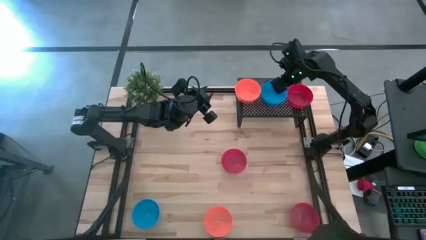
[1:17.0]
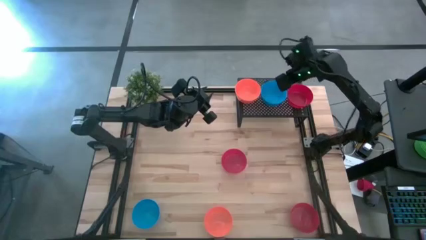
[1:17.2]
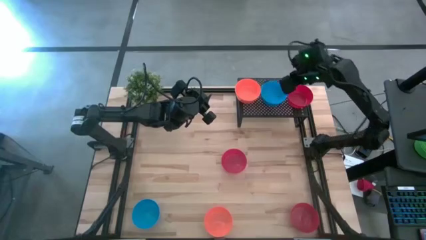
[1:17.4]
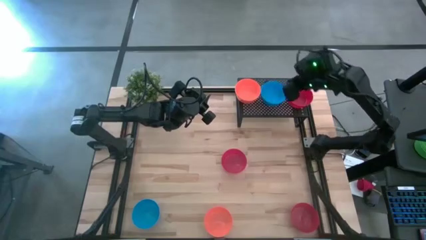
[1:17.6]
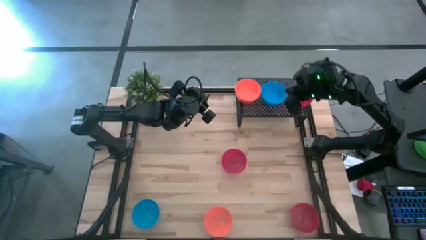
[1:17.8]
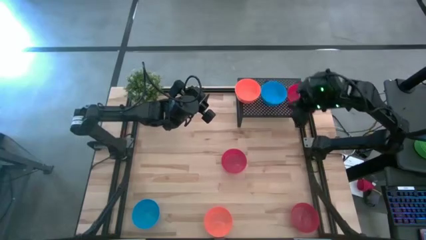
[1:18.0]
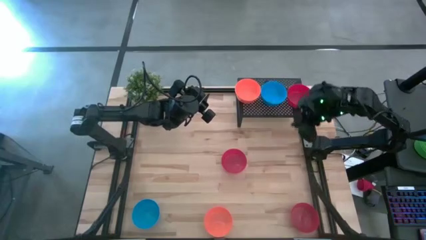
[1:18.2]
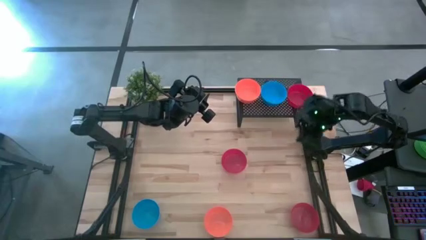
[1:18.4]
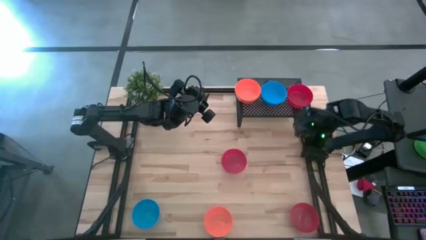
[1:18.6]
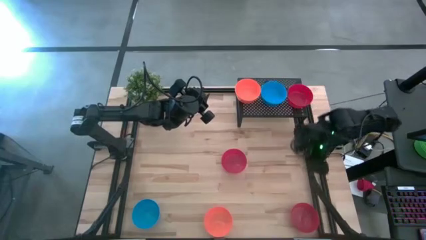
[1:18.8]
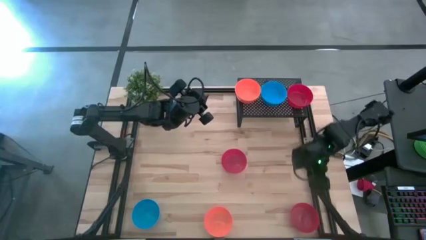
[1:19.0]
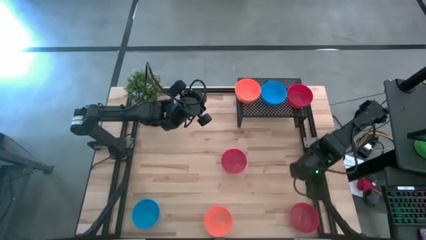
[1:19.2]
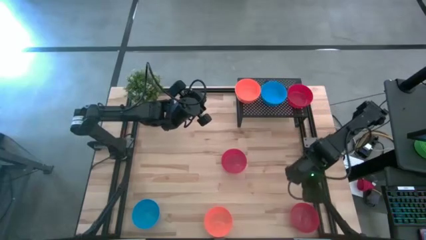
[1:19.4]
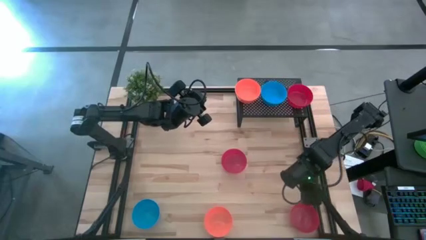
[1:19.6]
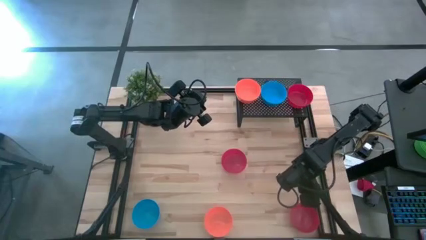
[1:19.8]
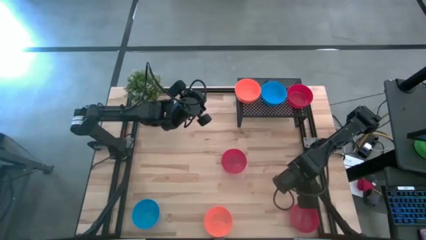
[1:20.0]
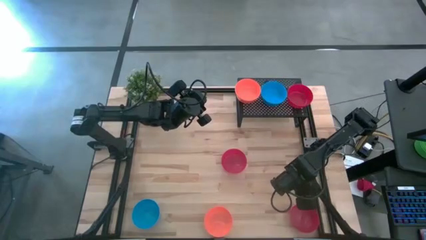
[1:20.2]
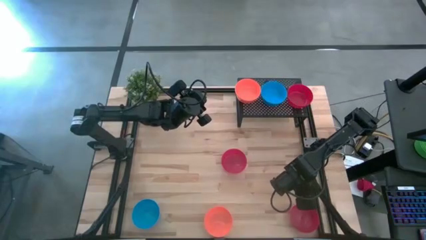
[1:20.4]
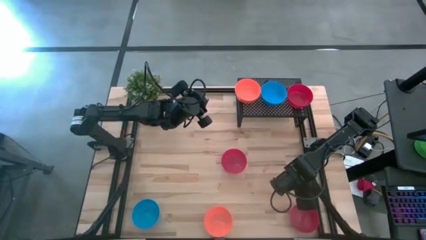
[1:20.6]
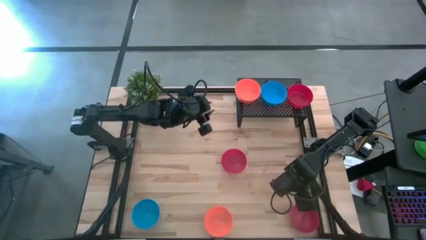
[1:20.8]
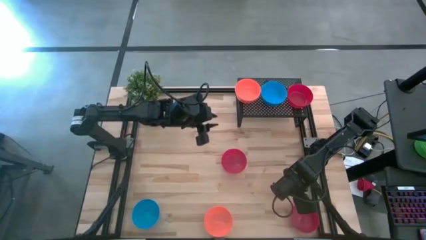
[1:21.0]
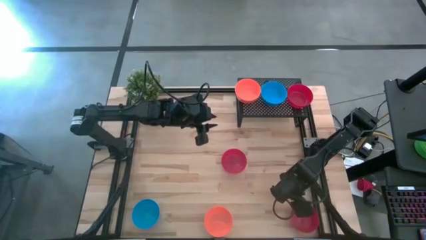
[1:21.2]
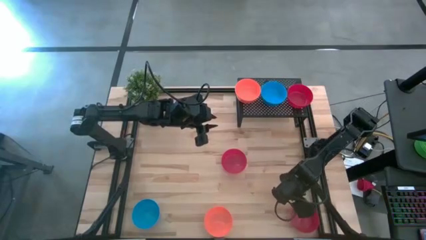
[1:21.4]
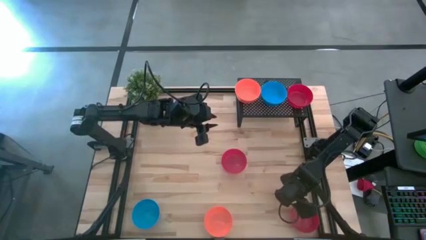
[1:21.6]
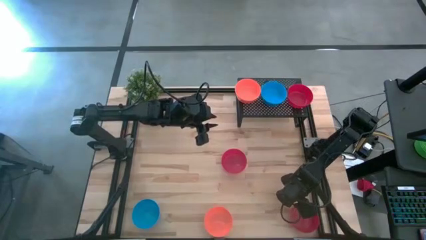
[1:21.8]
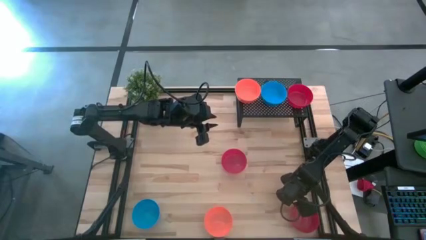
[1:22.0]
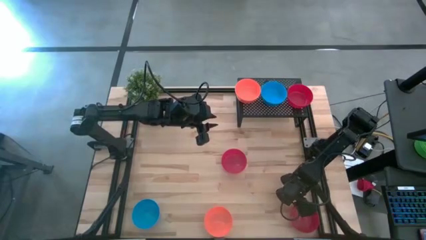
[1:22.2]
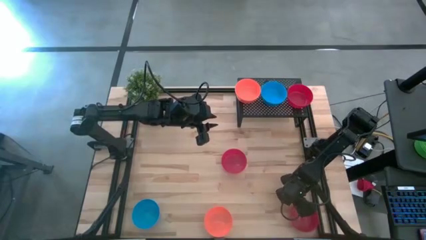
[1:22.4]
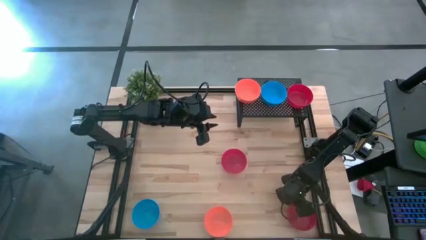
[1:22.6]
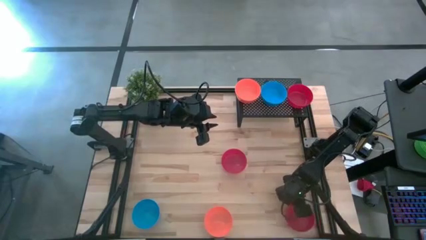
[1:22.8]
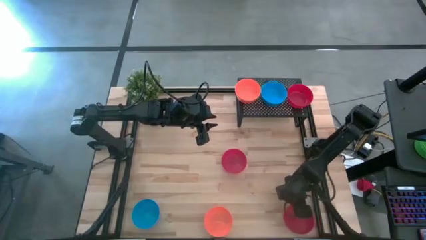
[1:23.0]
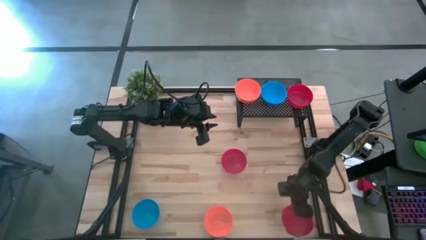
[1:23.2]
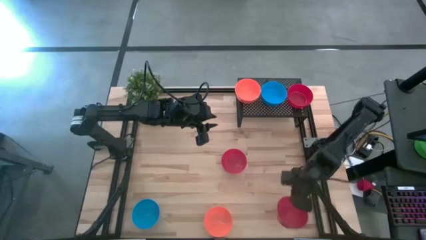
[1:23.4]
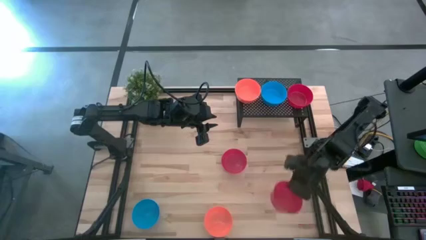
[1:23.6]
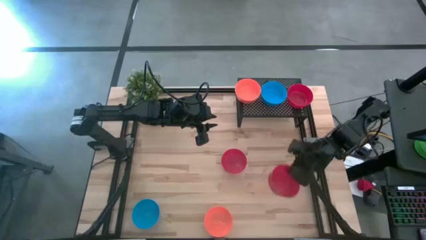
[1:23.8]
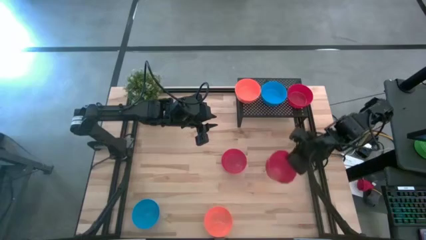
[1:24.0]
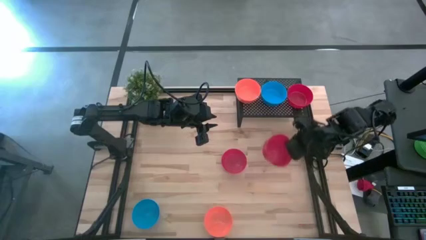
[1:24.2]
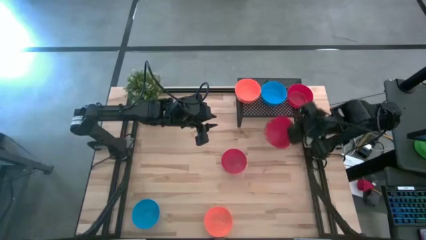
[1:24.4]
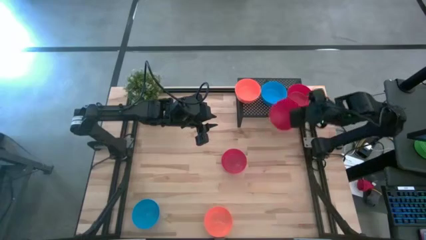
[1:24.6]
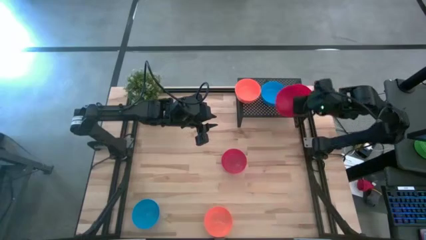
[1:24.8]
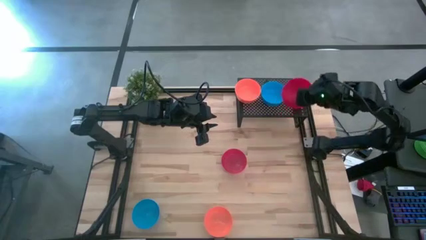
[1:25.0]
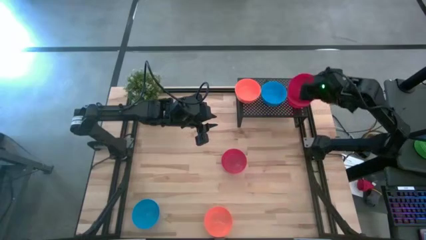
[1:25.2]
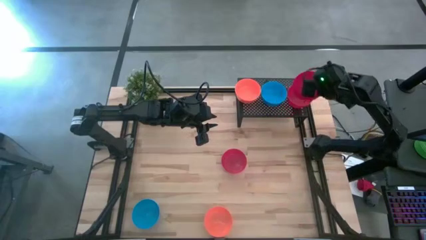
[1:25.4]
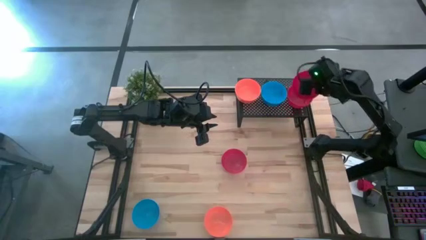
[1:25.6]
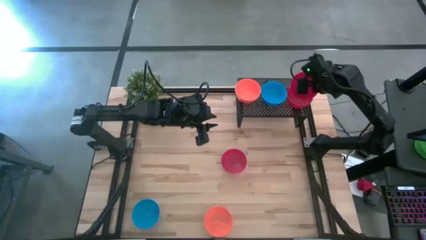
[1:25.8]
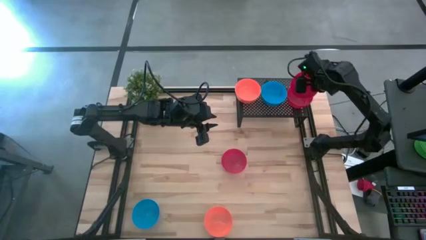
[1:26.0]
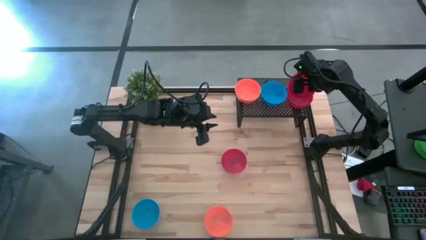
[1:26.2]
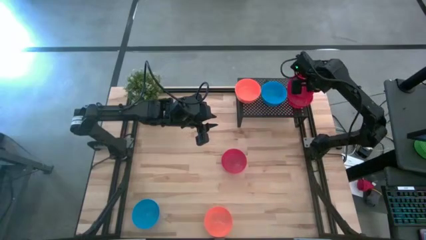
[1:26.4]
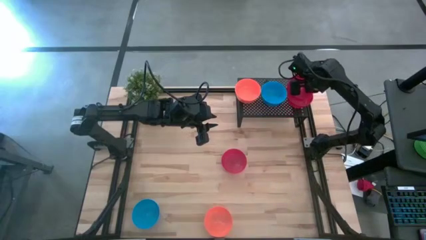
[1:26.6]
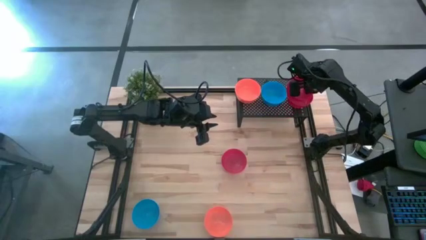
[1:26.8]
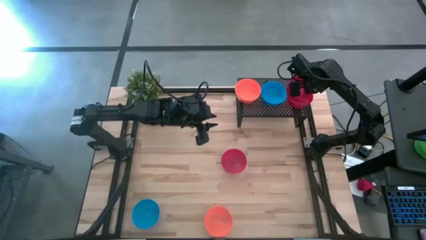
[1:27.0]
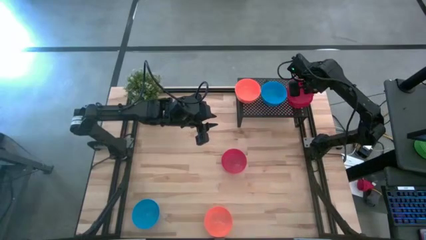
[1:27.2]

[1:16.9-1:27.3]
Task: Pick & Place Mini bowls
Stack the right red bowl on top of the red bowl on the shelf
